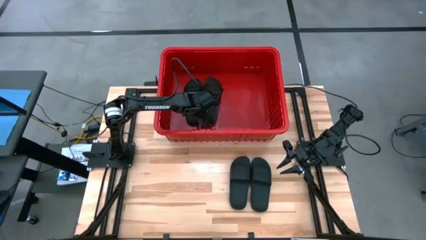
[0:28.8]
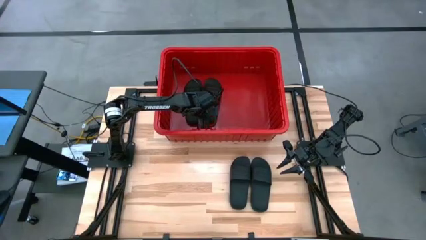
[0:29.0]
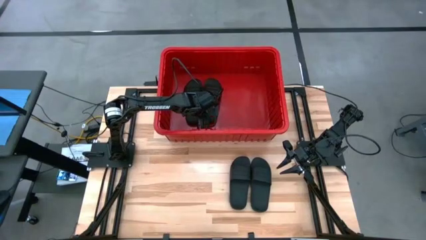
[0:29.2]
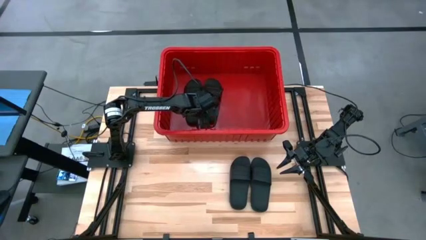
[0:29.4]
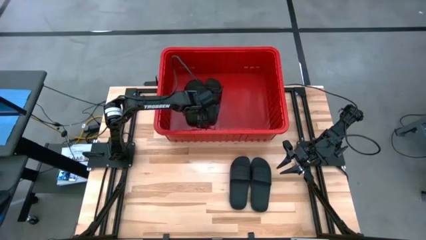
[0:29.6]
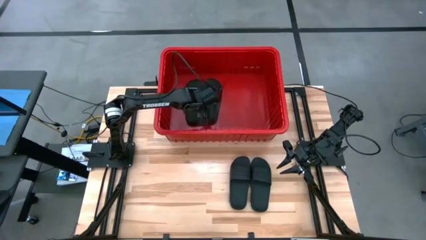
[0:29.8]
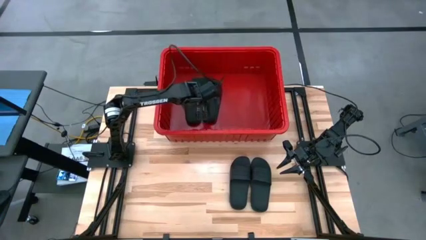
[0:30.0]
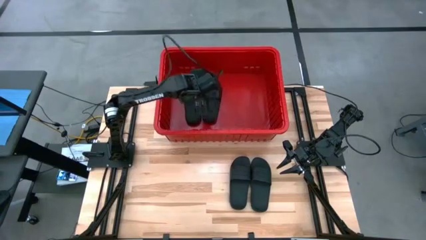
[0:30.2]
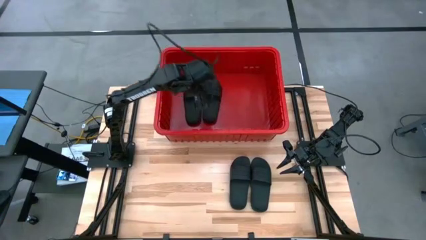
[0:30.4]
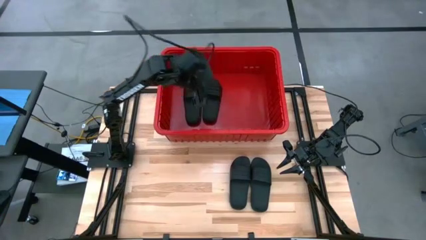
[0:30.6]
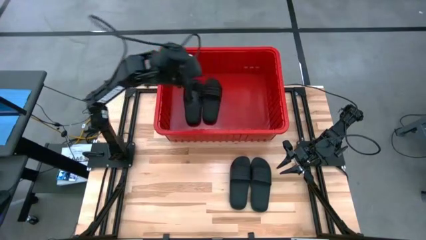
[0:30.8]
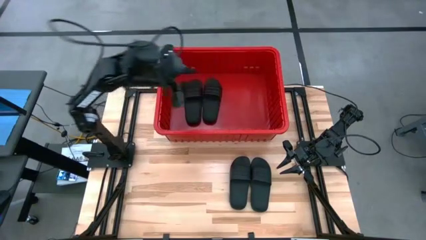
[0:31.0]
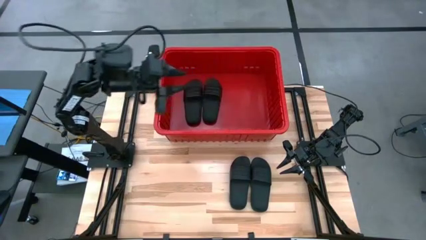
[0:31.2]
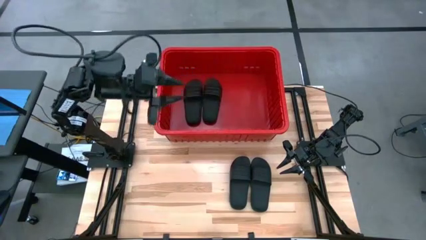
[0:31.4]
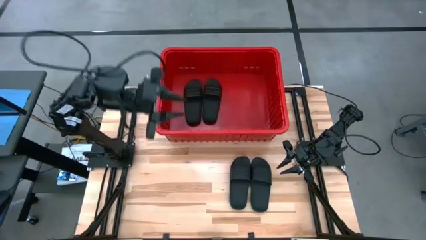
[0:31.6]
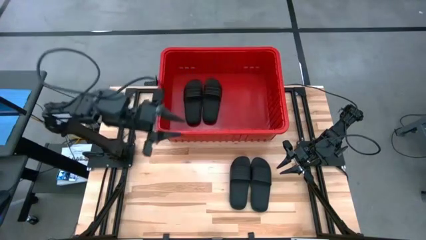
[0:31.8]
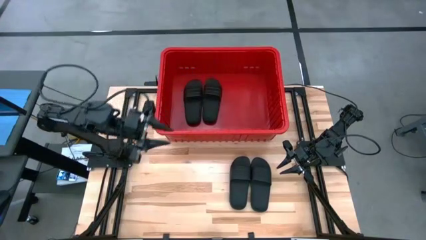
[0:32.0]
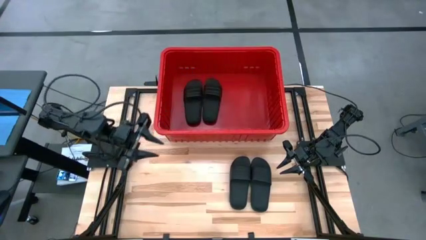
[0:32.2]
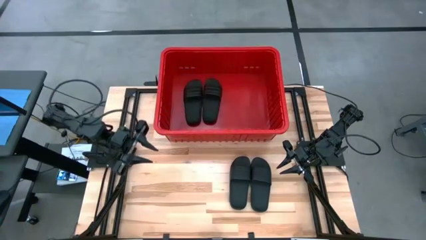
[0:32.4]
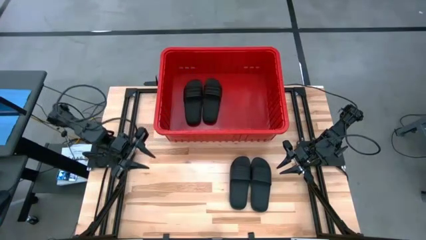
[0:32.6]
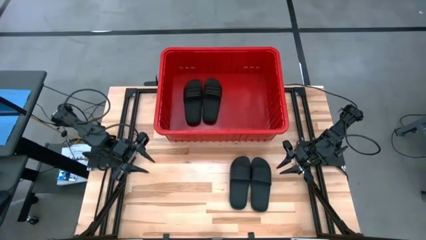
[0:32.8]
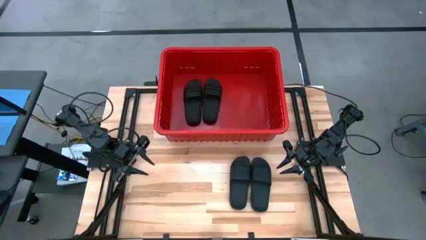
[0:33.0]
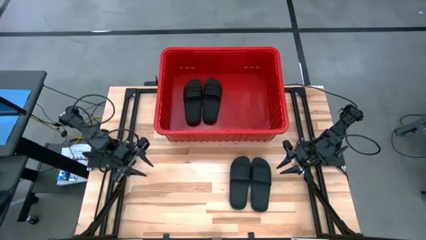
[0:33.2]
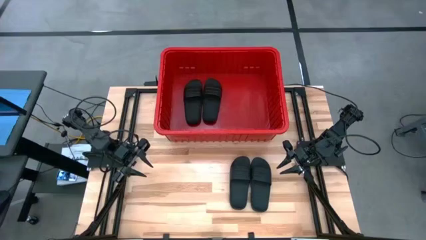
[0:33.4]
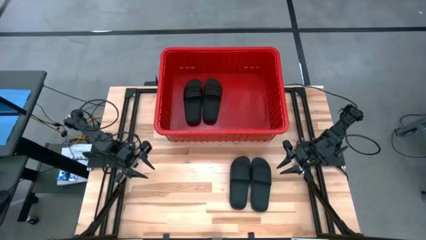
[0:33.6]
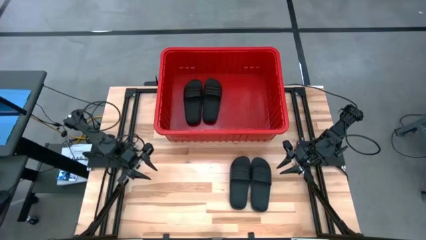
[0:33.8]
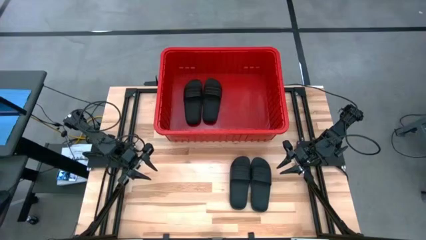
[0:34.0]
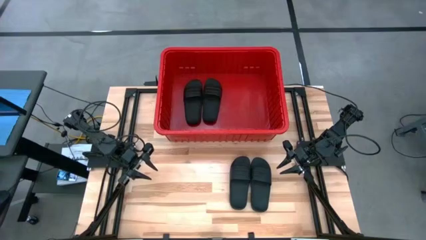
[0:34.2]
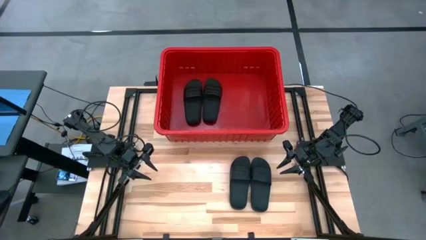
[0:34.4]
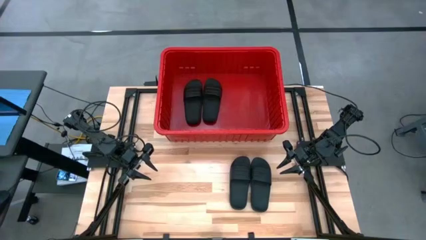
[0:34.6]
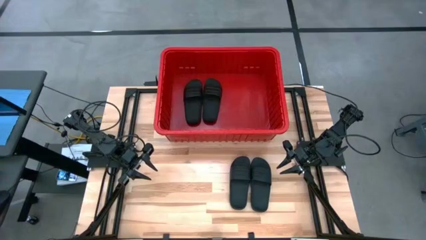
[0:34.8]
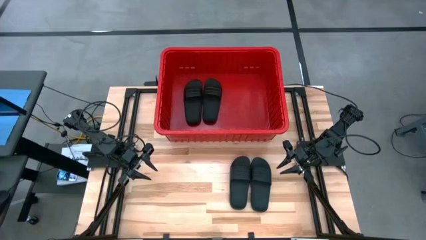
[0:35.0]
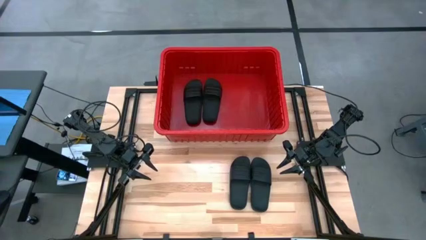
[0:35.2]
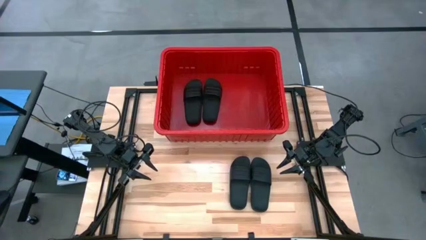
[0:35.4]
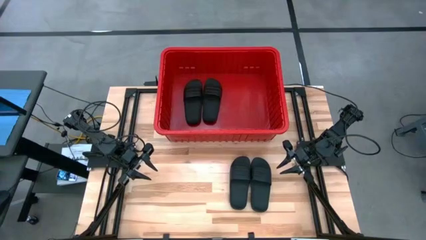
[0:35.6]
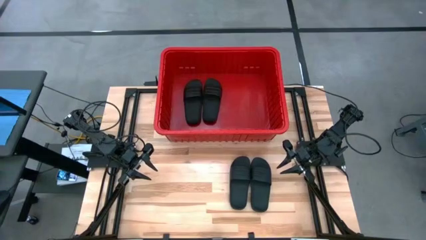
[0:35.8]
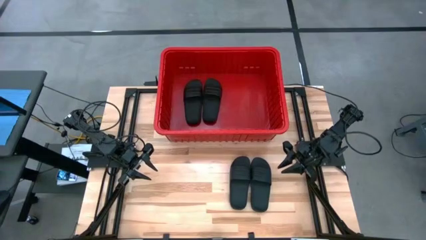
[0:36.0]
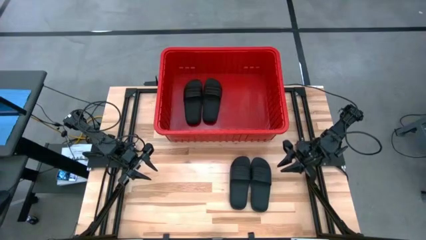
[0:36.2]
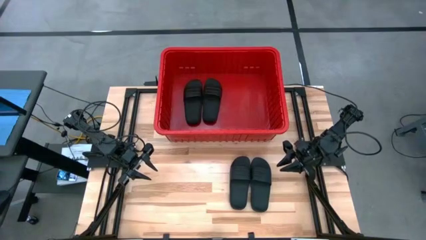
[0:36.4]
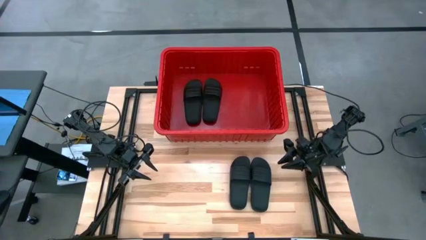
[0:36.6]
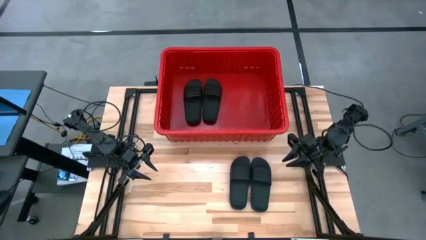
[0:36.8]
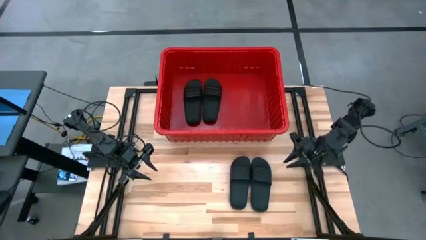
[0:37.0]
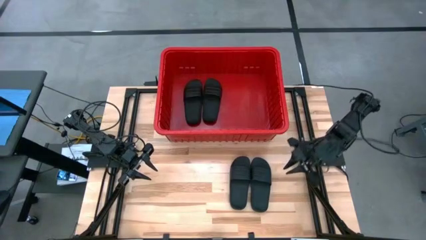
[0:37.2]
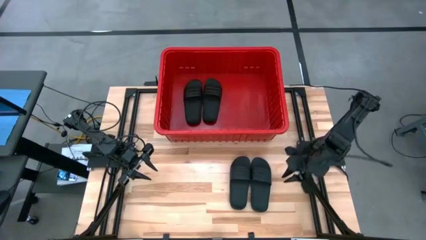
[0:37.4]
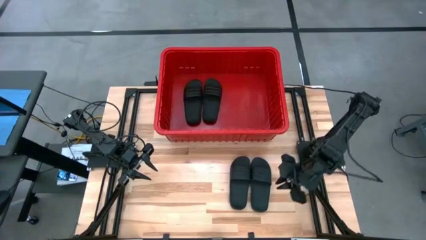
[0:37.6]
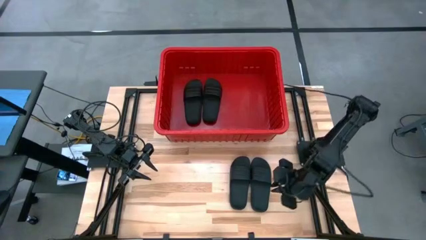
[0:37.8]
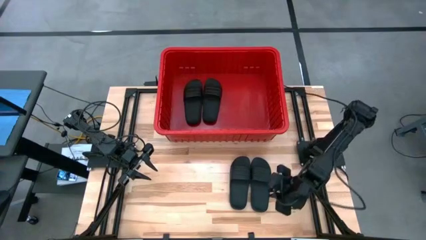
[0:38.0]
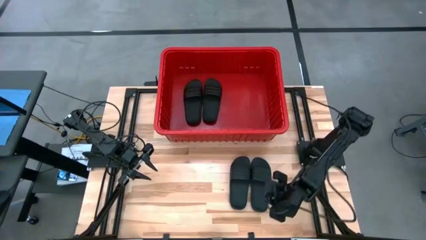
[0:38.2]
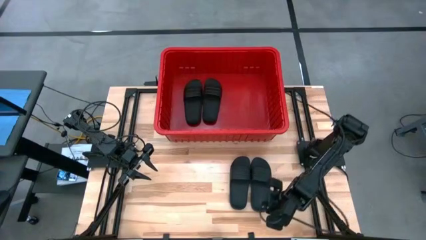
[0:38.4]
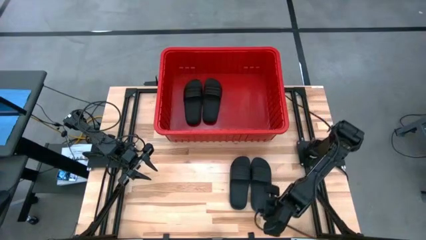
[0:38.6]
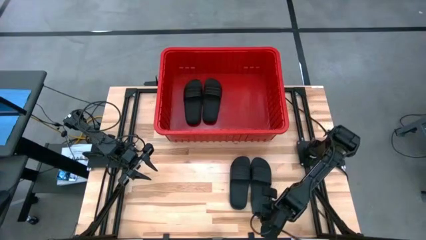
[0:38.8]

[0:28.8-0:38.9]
Task: Pick and place slides into bin
Put the black slide into the red container
